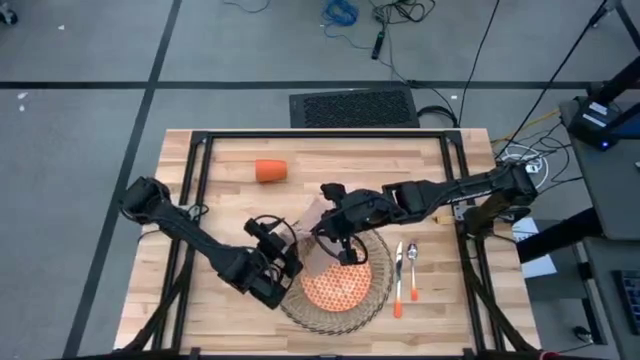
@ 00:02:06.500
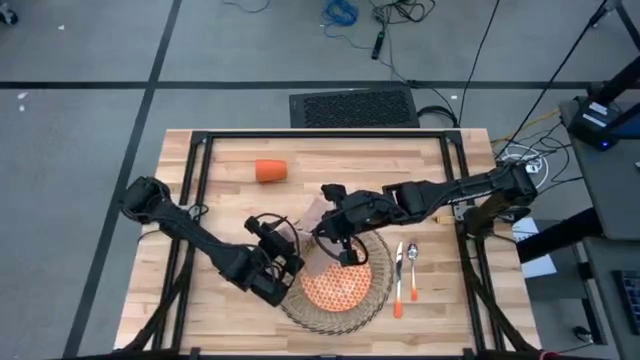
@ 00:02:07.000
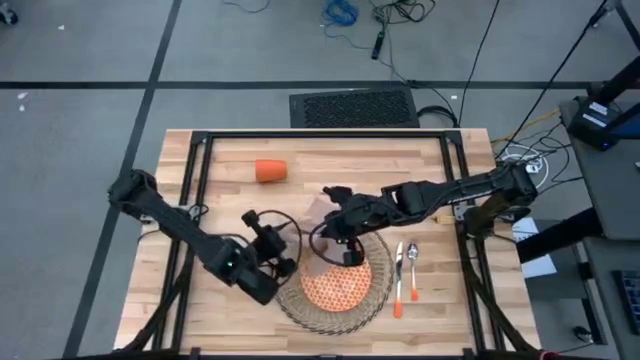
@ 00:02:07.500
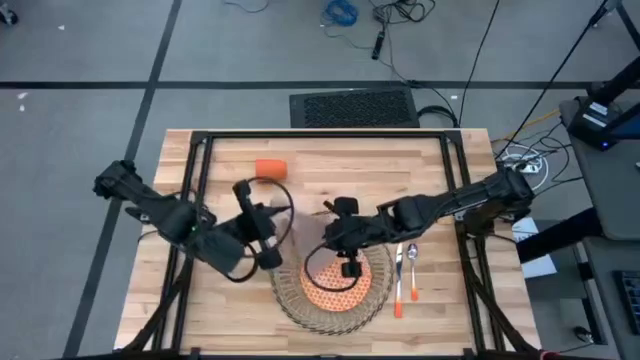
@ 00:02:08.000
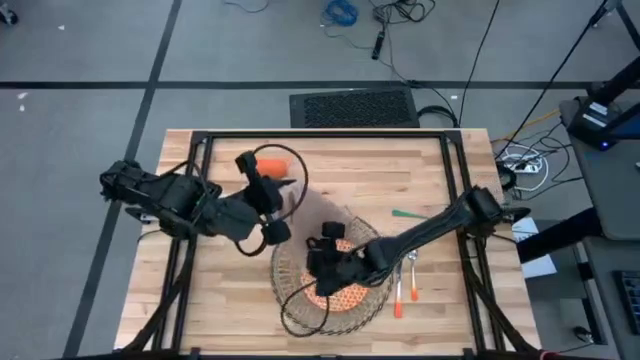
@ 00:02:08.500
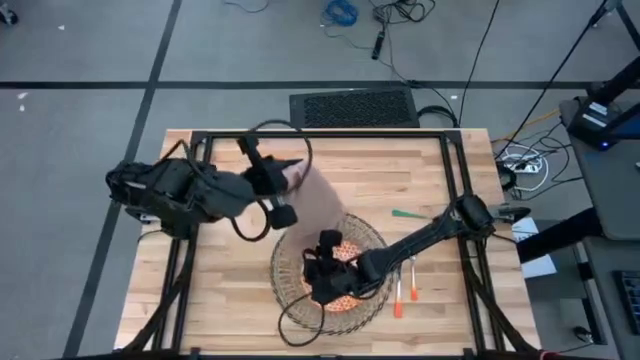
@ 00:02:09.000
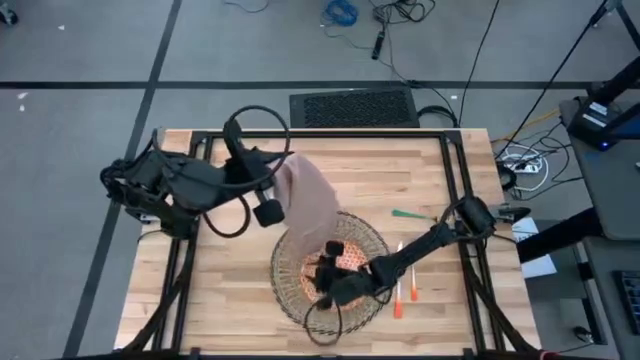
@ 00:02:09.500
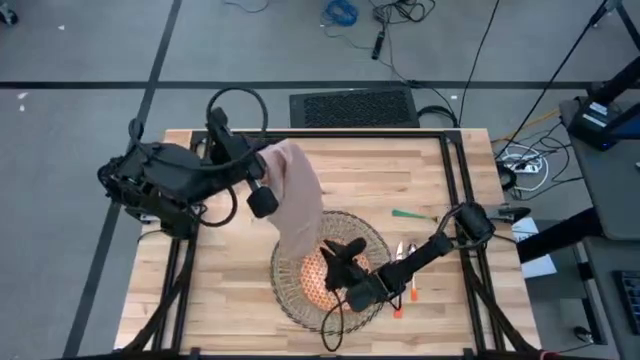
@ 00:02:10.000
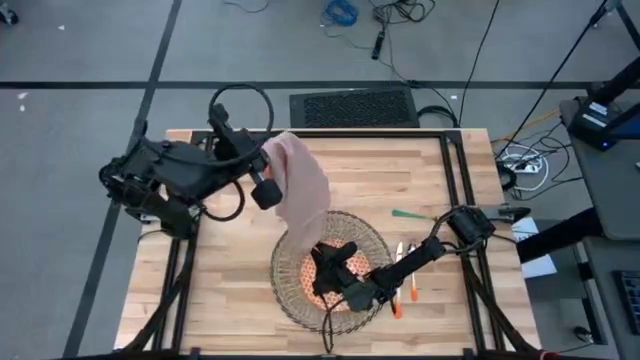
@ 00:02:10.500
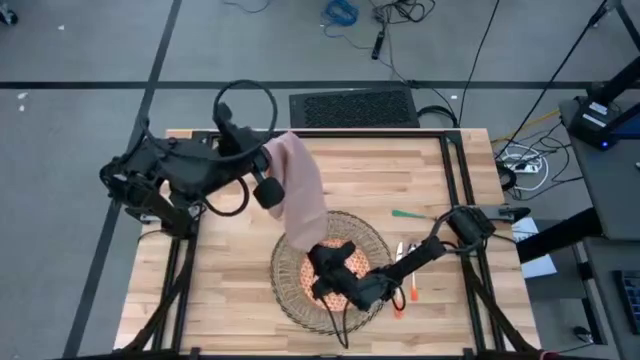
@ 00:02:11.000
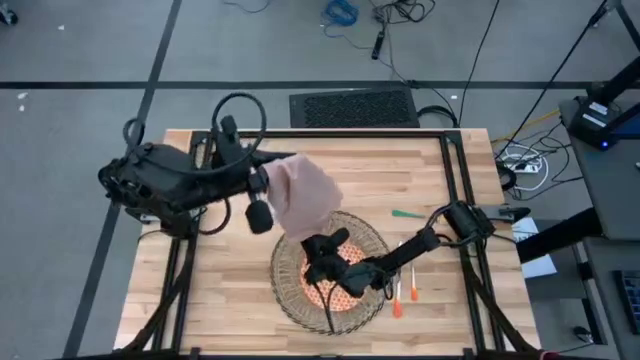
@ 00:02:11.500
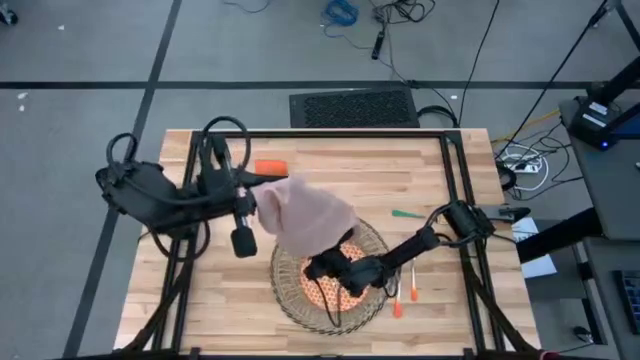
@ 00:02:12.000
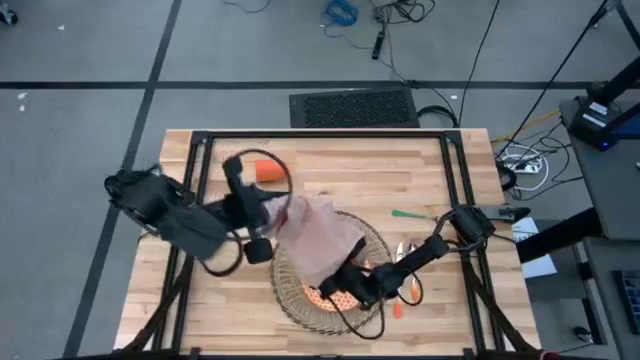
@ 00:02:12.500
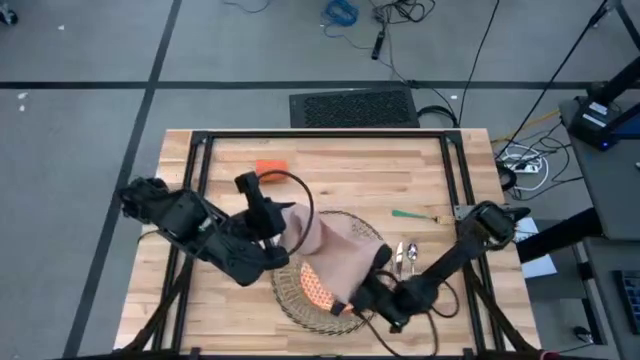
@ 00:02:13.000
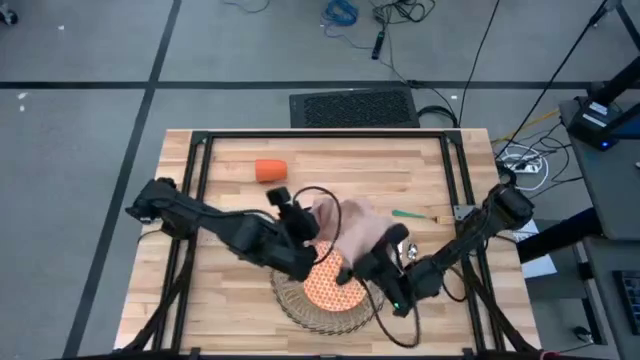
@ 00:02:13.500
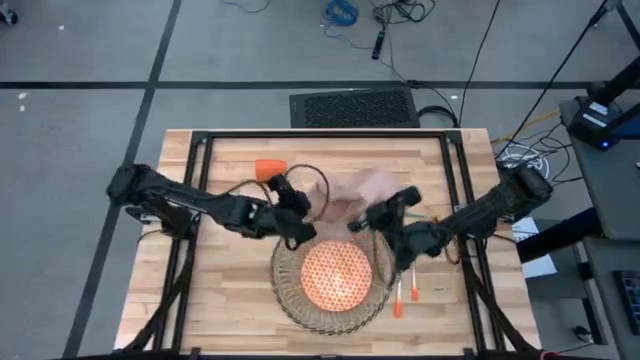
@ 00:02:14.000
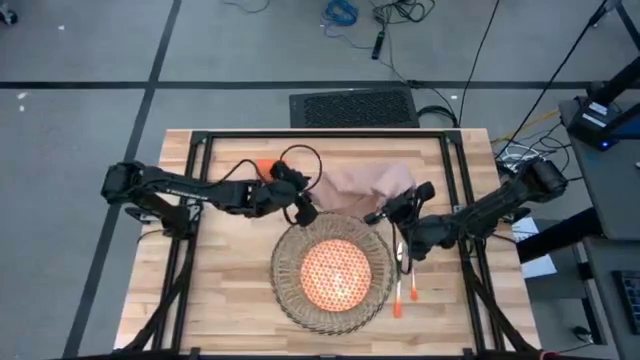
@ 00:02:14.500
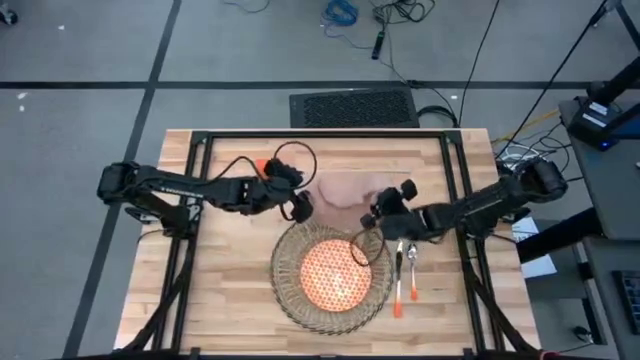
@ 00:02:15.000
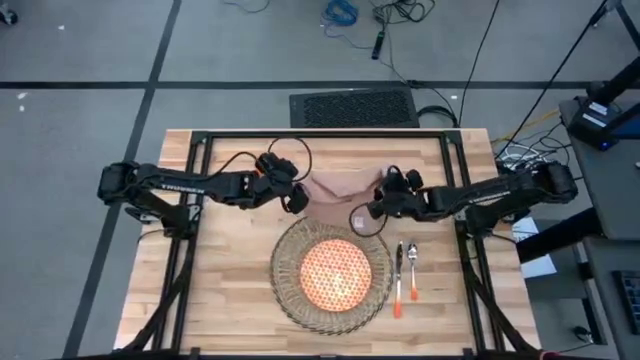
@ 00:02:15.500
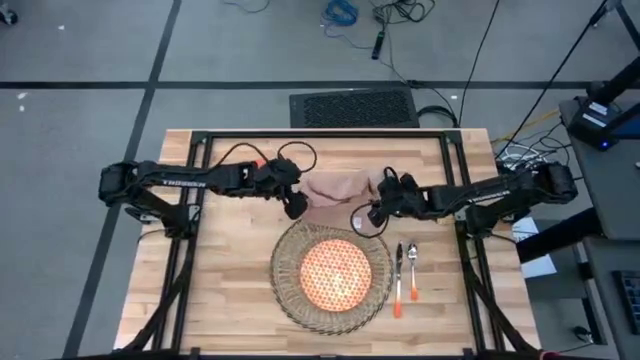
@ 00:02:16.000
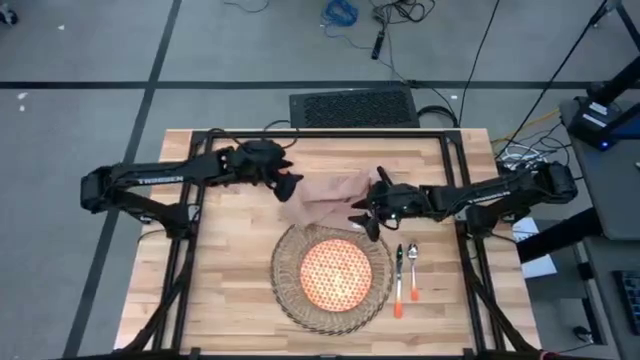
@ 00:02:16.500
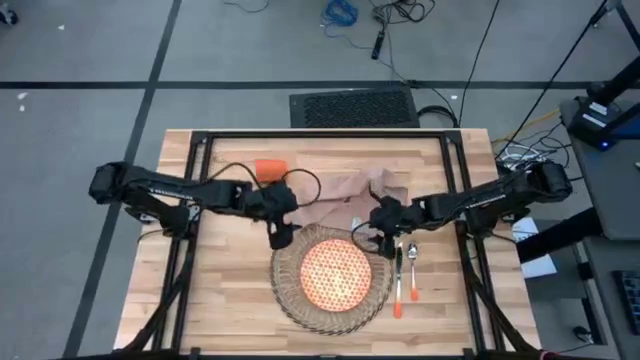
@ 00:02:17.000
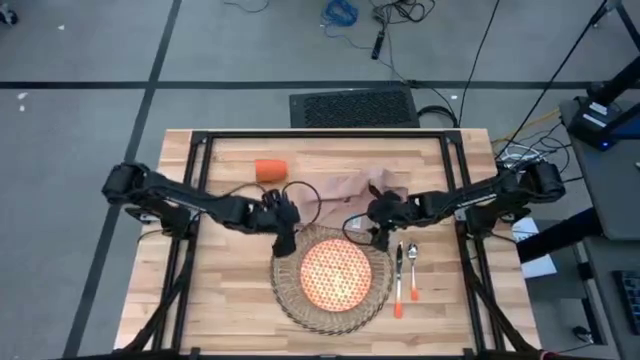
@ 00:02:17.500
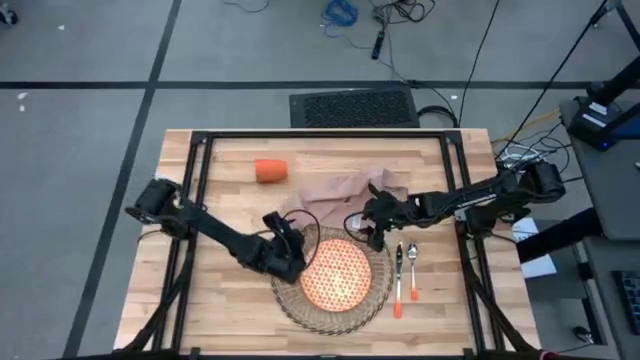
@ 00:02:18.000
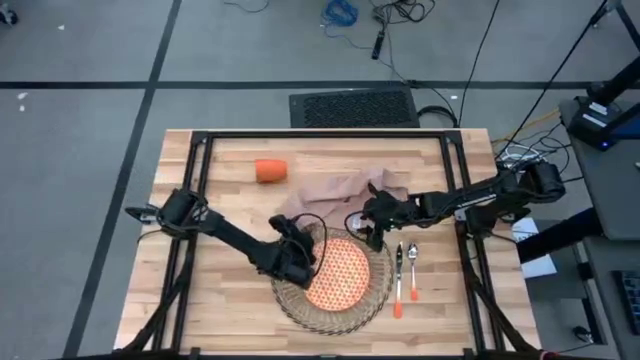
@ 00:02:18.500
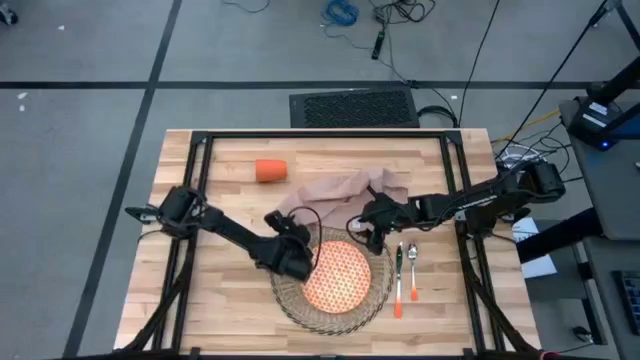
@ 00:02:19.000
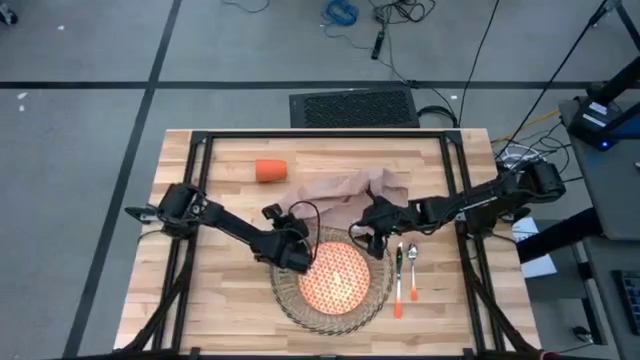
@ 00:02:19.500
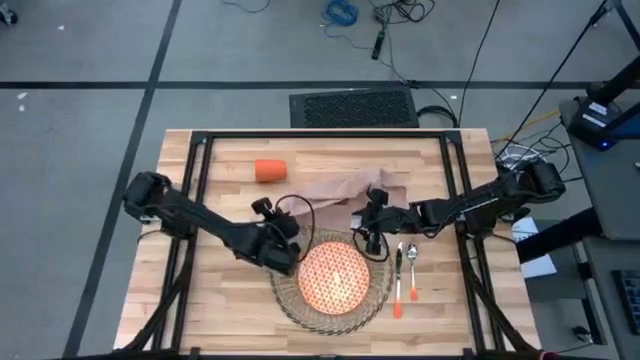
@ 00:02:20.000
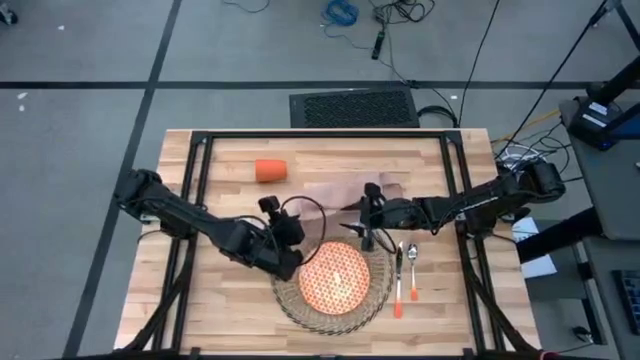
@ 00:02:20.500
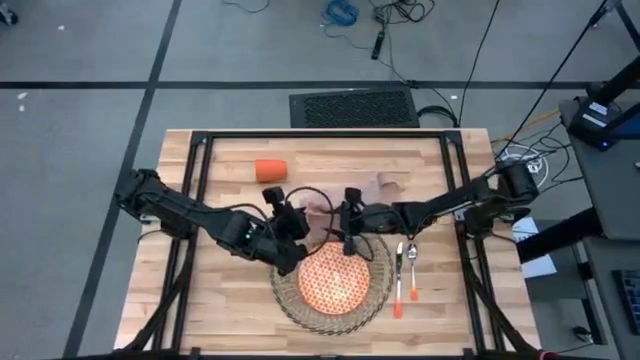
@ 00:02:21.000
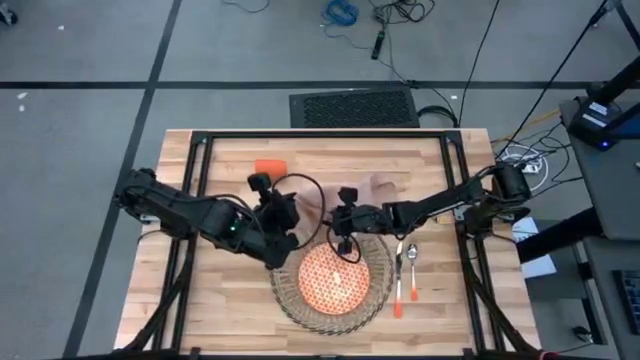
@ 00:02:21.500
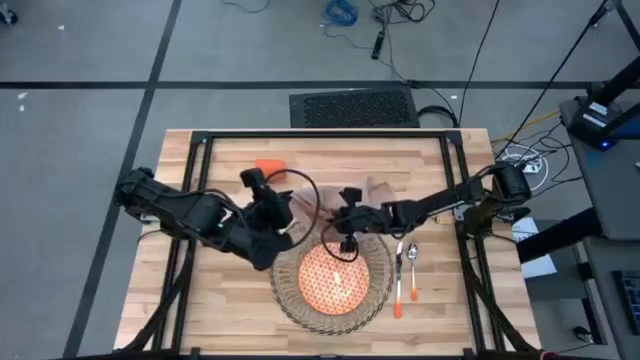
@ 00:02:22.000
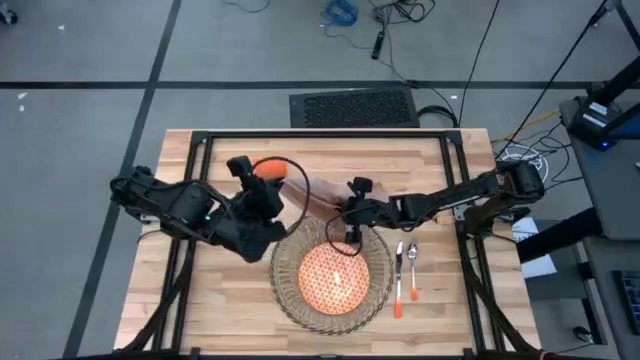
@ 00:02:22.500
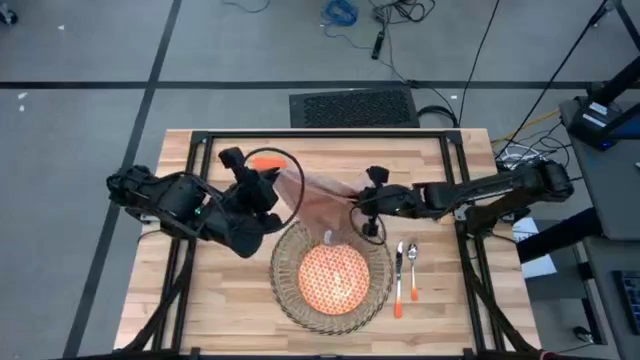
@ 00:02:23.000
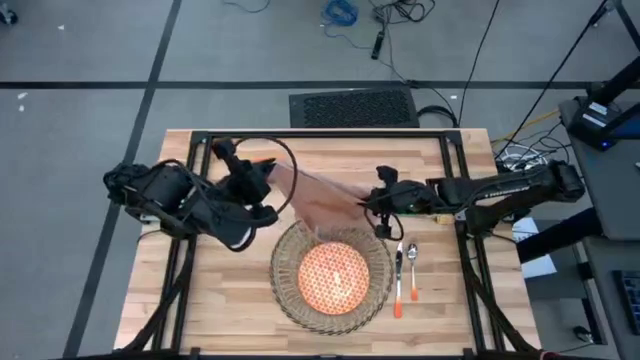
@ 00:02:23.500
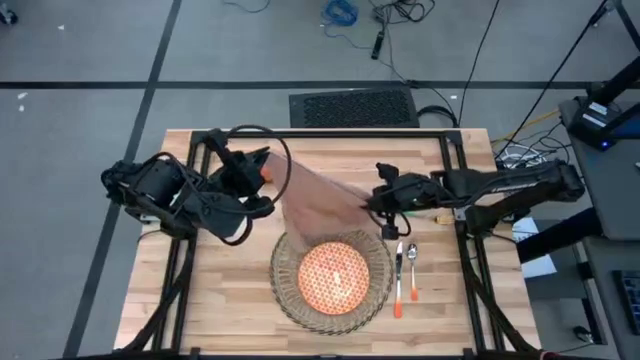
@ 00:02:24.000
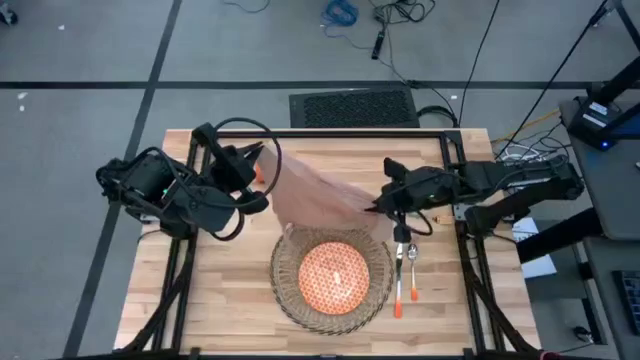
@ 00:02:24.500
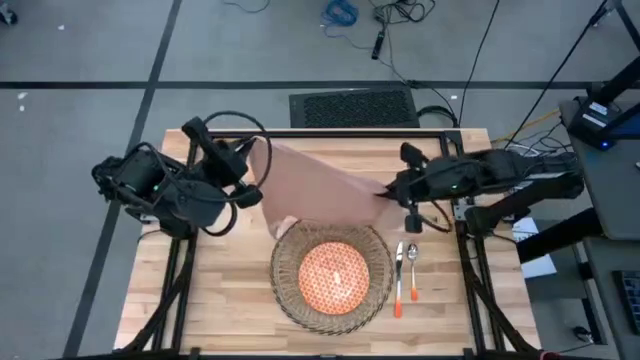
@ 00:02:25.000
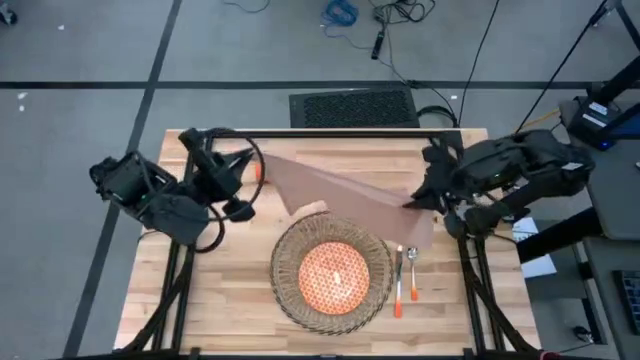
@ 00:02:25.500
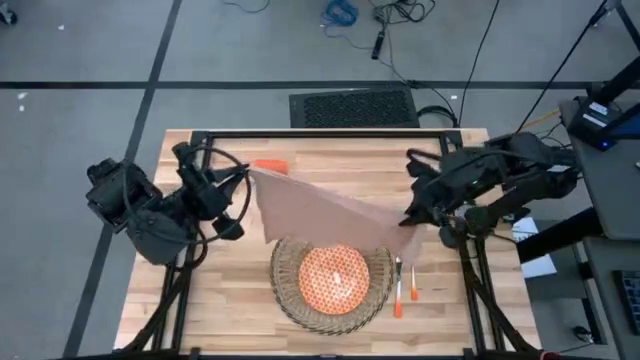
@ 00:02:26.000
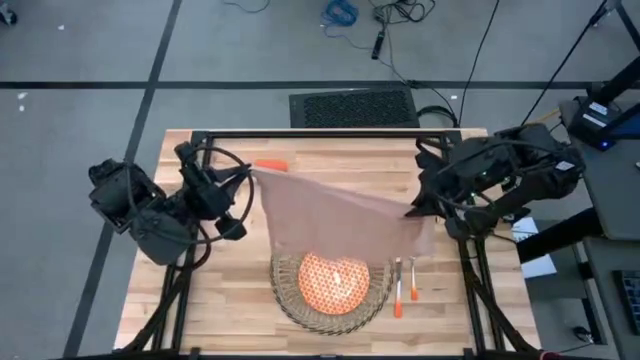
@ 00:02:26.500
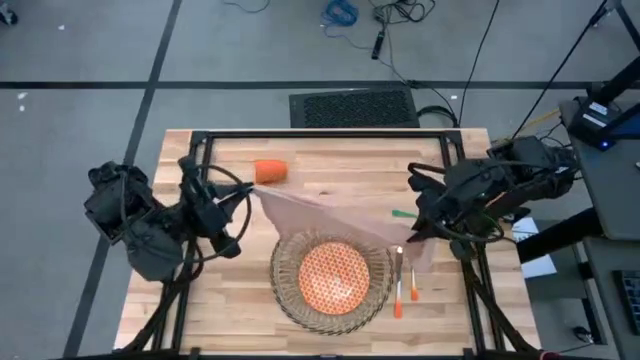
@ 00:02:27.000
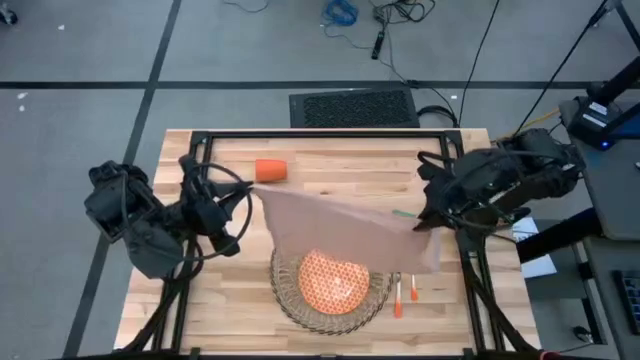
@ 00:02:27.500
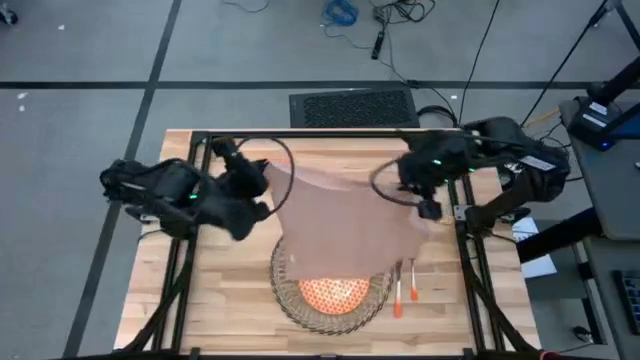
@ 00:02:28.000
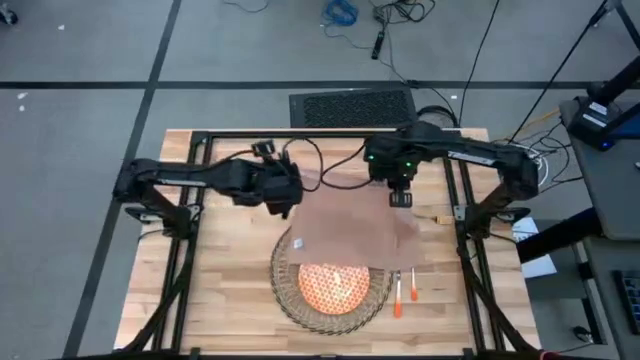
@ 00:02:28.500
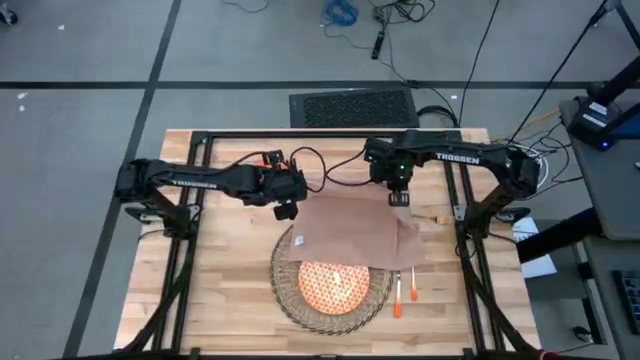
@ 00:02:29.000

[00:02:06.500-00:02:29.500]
Task: Set table place
Fold the white napkin
